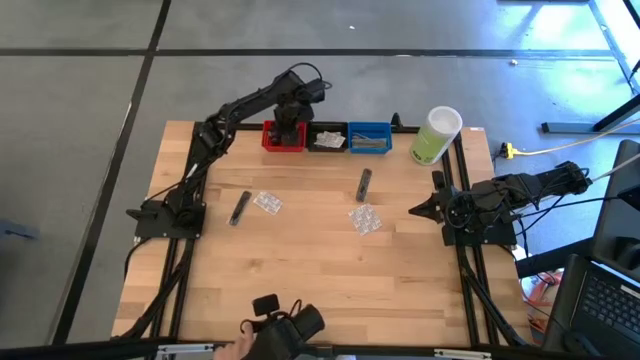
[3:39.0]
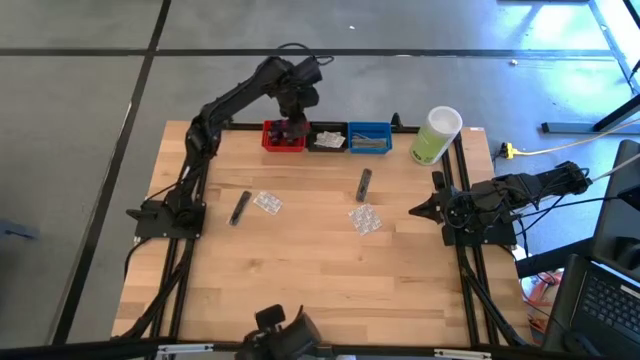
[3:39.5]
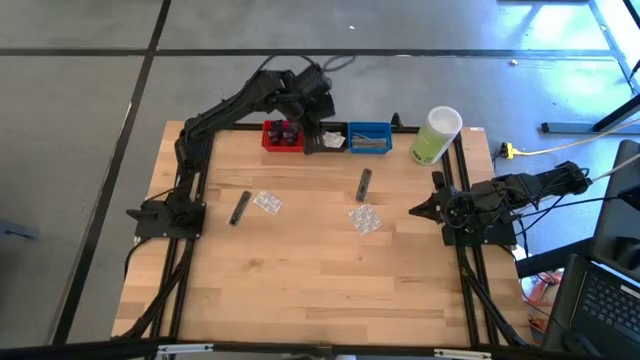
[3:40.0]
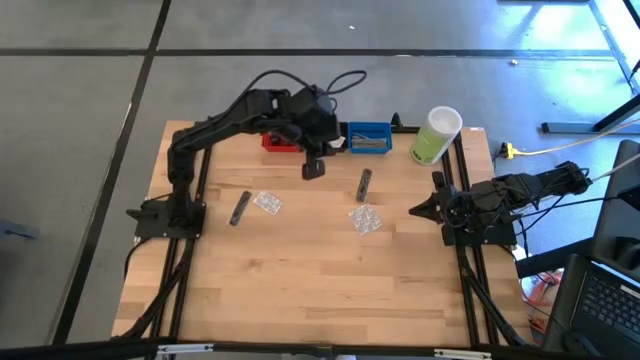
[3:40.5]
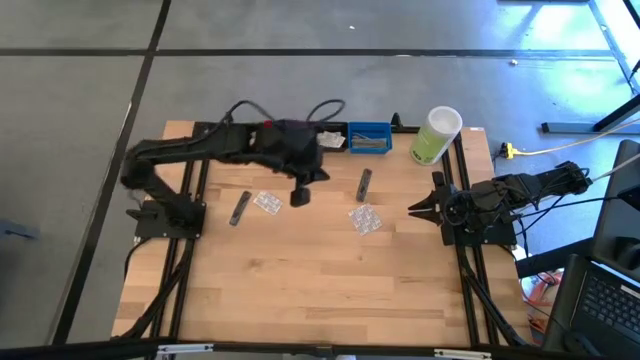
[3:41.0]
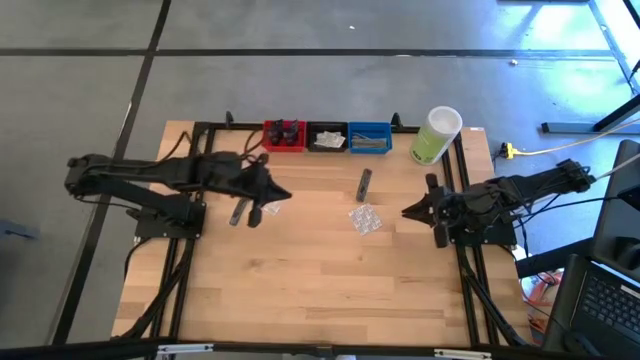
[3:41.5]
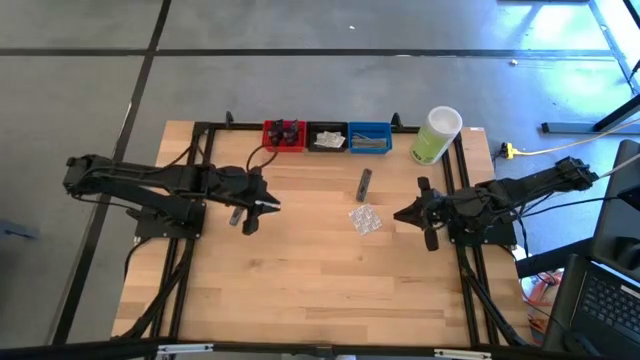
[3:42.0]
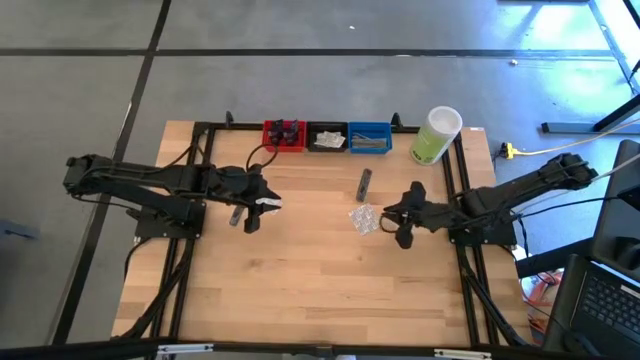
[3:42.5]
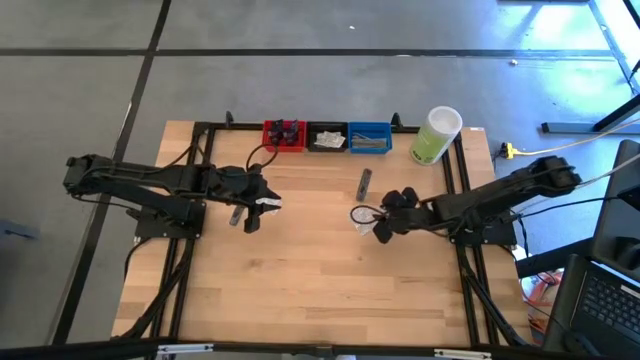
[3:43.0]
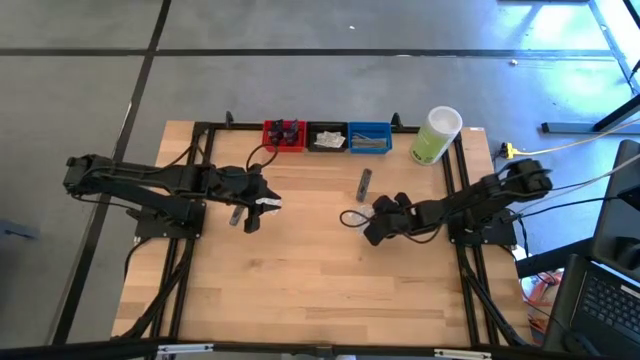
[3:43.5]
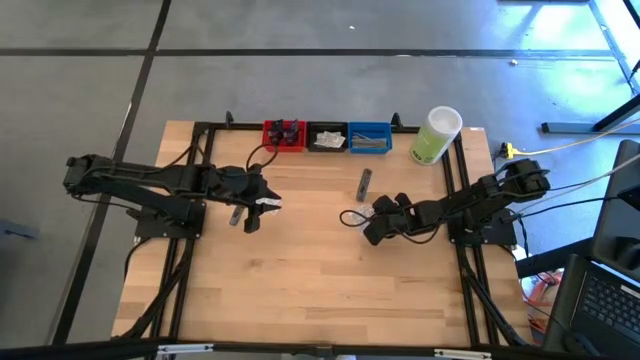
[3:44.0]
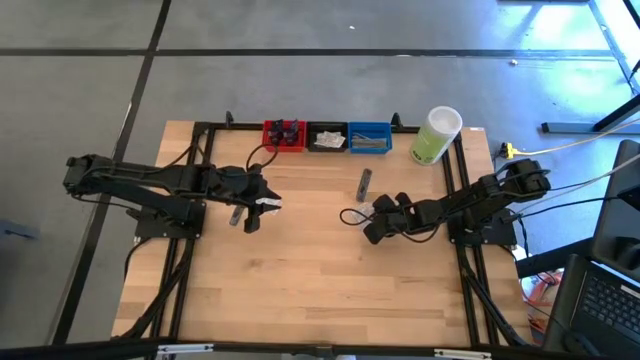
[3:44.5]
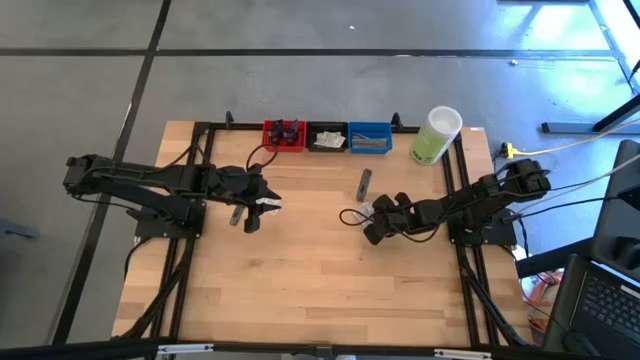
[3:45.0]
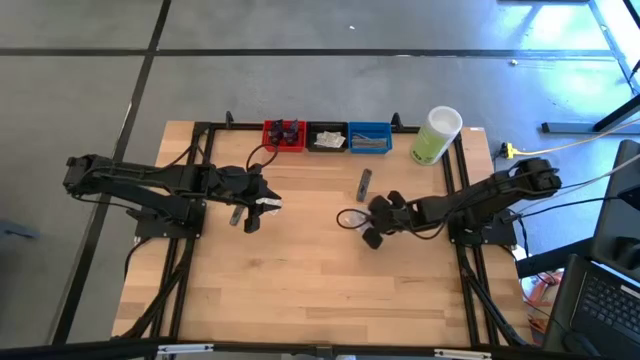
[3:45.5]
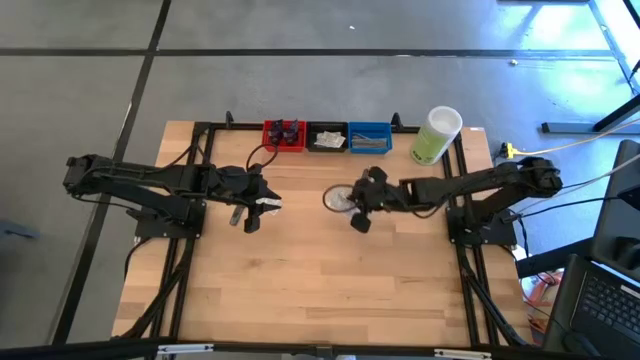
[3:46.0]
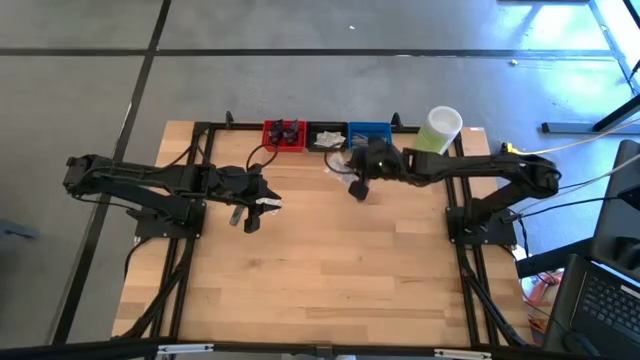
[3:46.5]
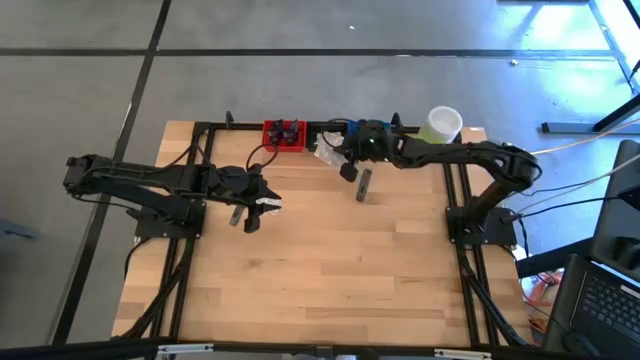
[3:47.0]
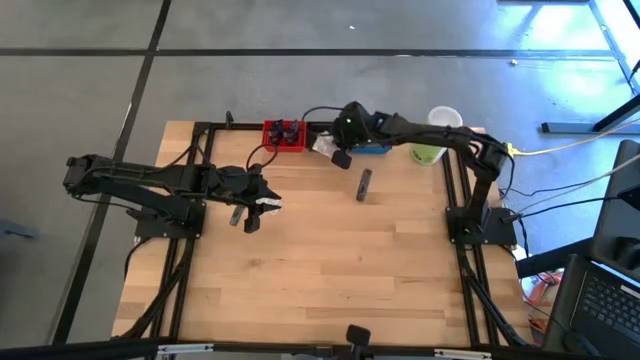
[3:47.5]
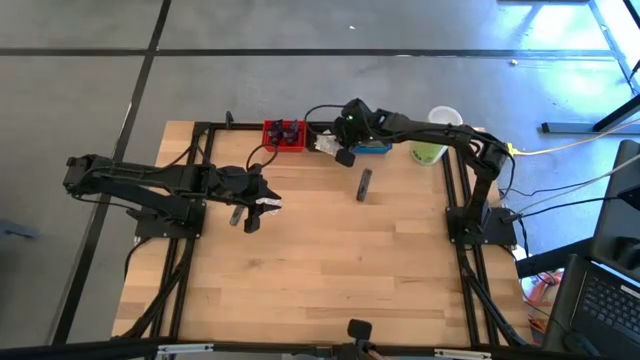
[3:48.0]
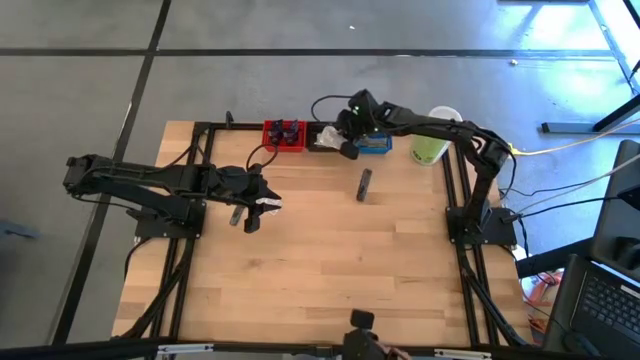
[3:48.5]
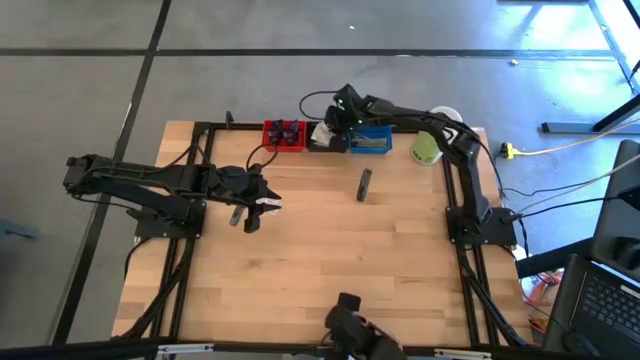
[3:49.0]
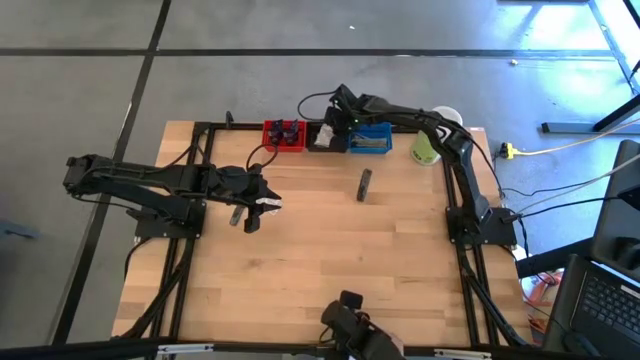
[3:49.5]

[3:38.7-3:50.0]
Task: Pick & Place Travel size toiletries
Put the white bandage pack into the black bin

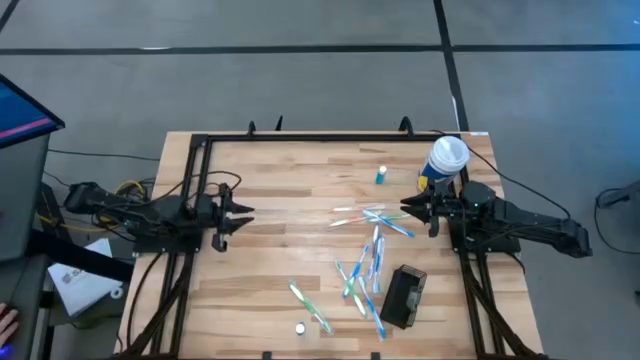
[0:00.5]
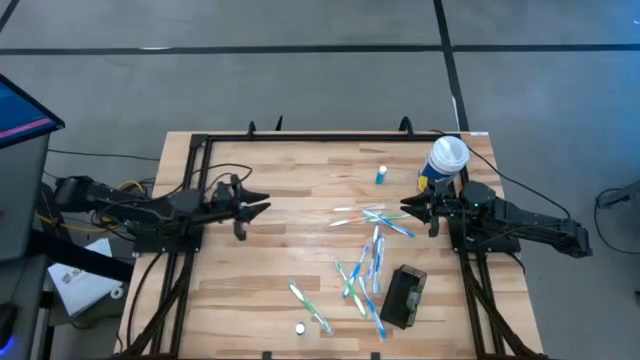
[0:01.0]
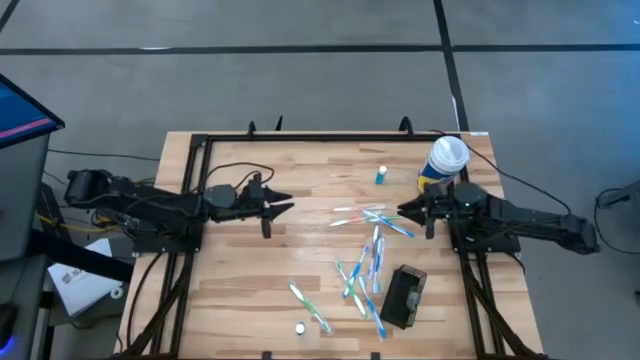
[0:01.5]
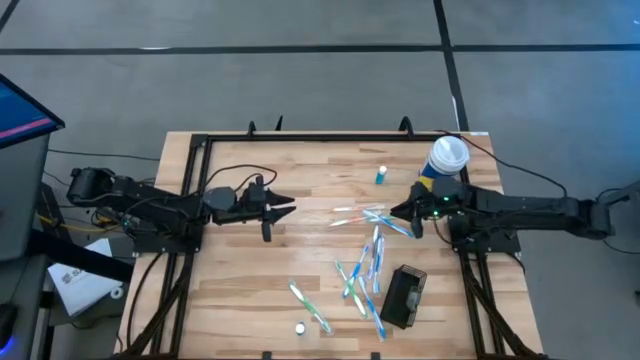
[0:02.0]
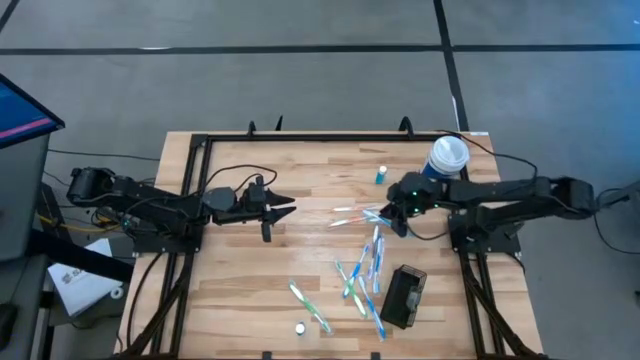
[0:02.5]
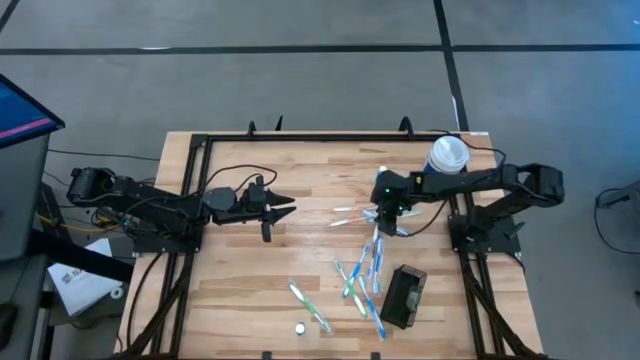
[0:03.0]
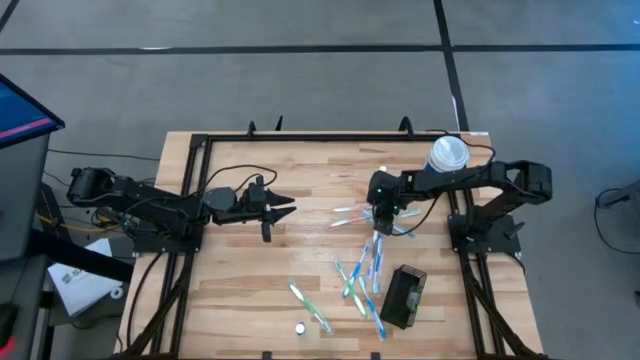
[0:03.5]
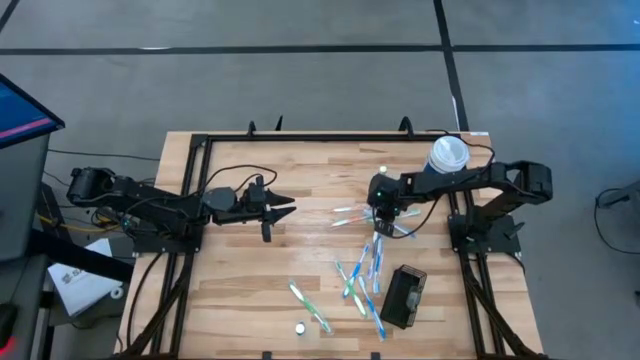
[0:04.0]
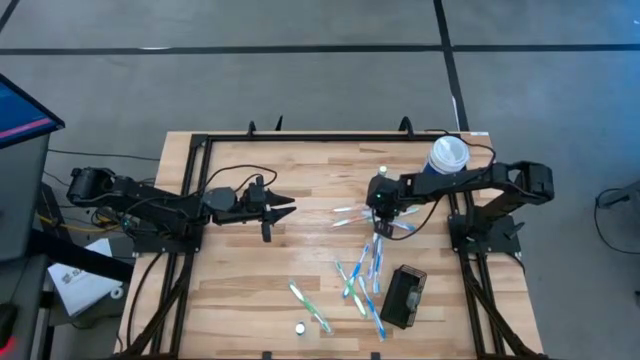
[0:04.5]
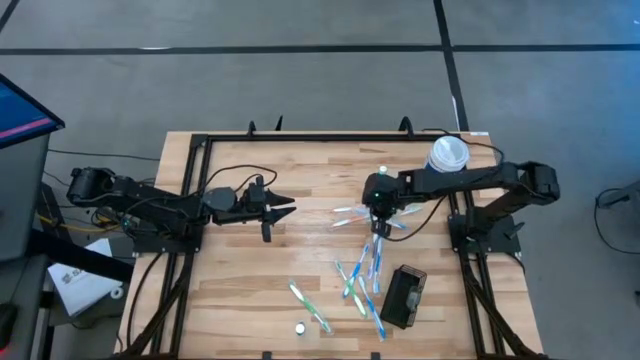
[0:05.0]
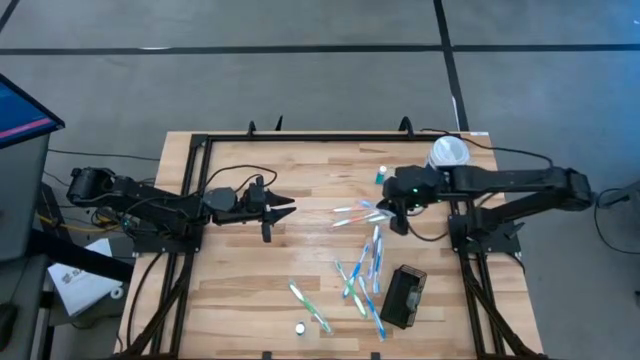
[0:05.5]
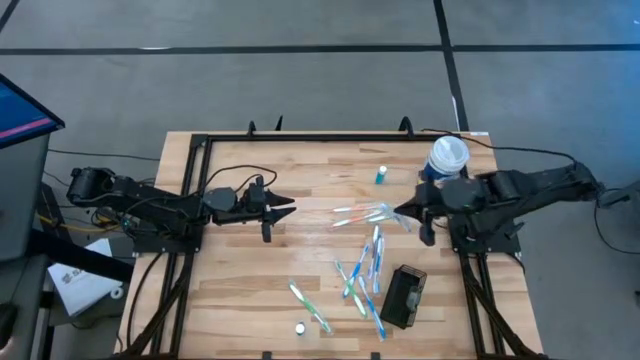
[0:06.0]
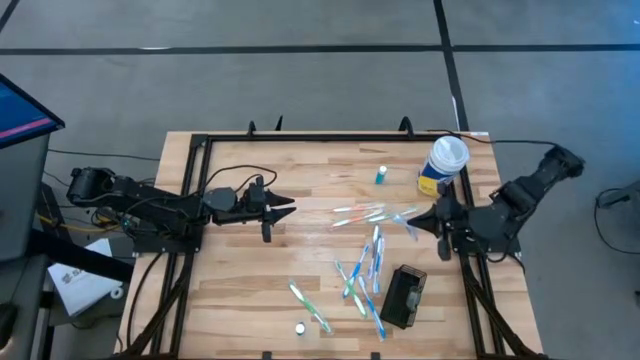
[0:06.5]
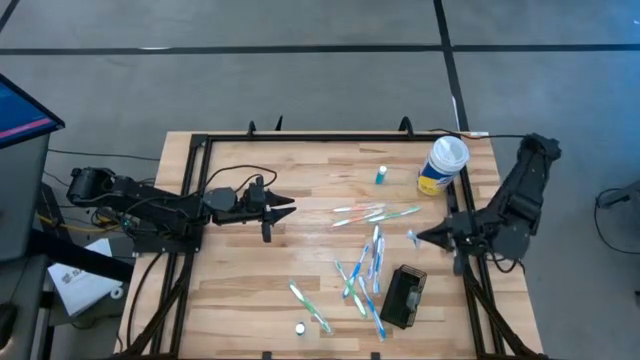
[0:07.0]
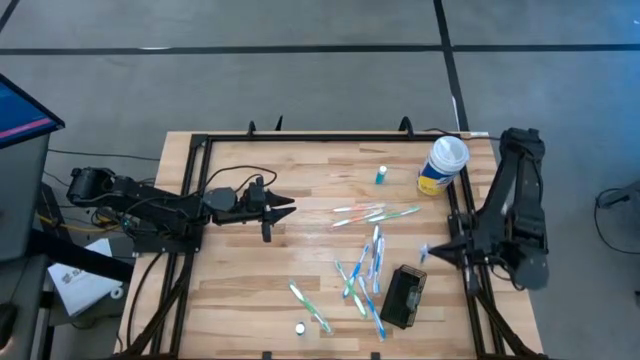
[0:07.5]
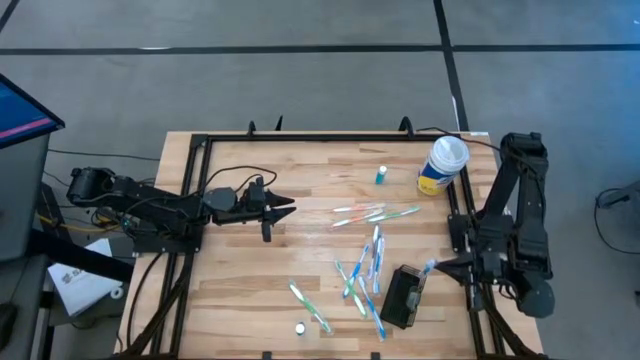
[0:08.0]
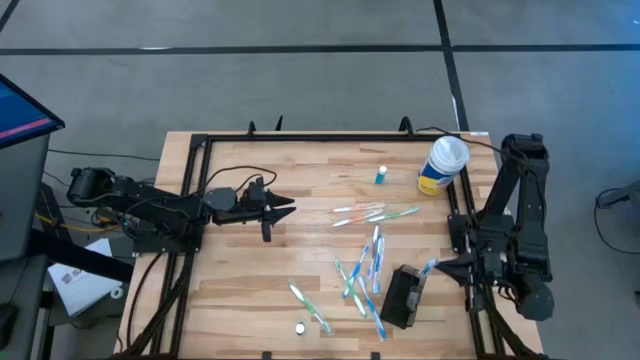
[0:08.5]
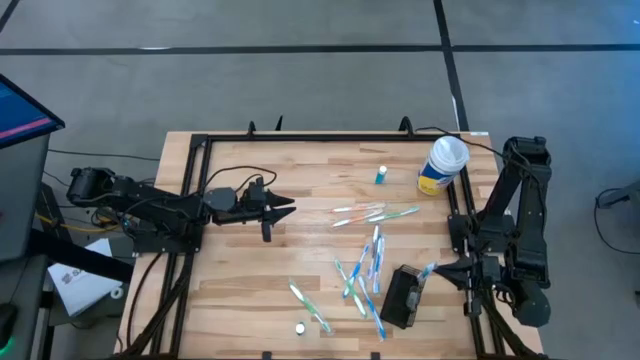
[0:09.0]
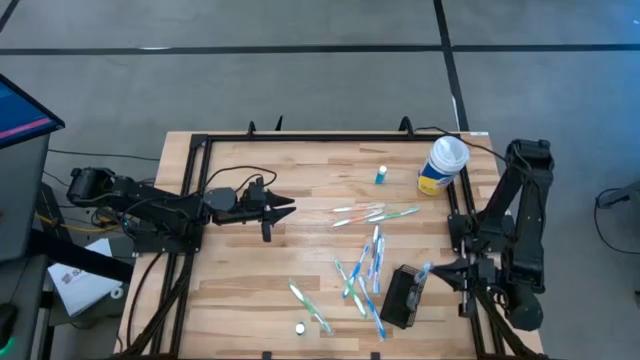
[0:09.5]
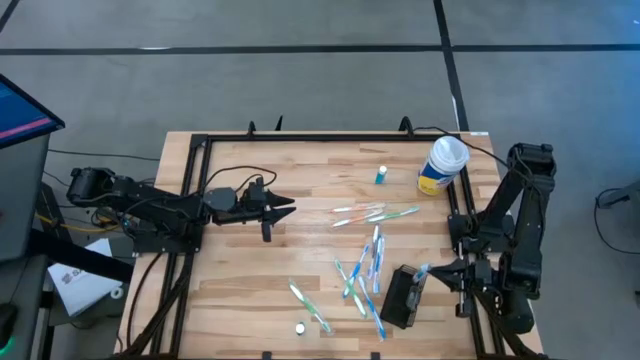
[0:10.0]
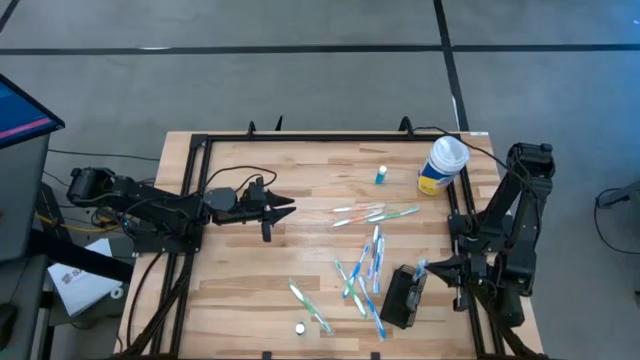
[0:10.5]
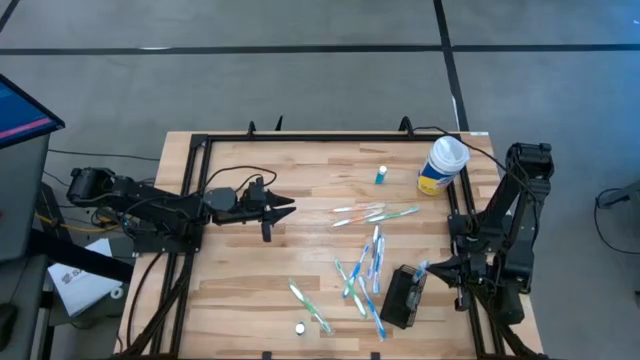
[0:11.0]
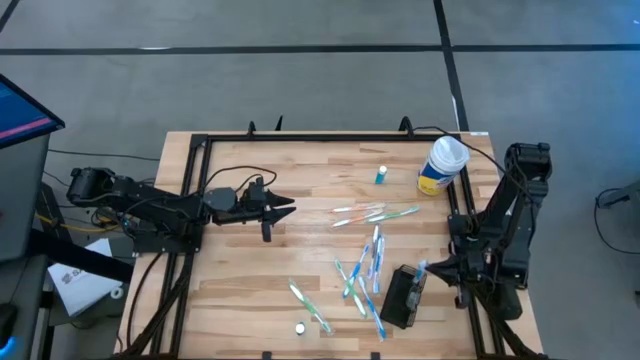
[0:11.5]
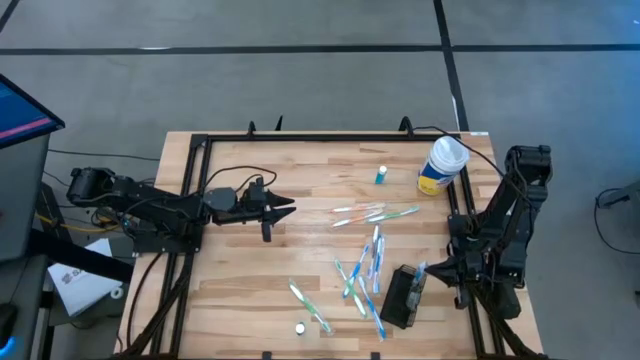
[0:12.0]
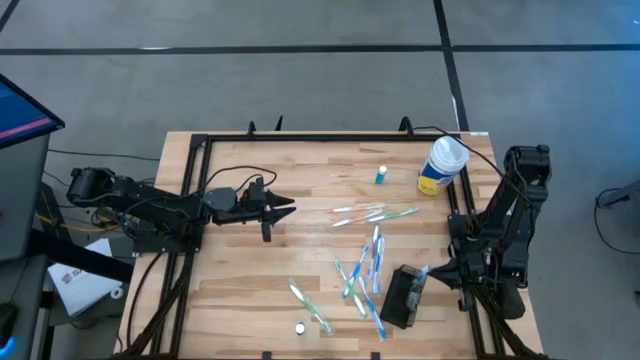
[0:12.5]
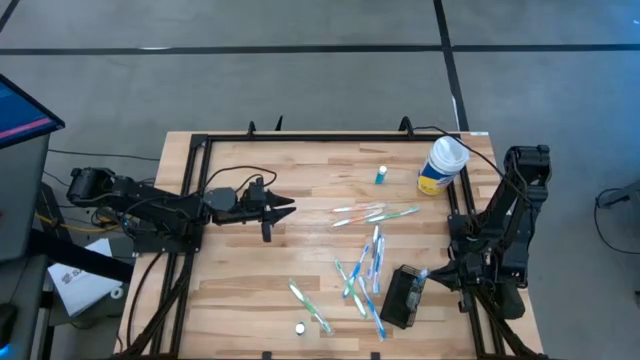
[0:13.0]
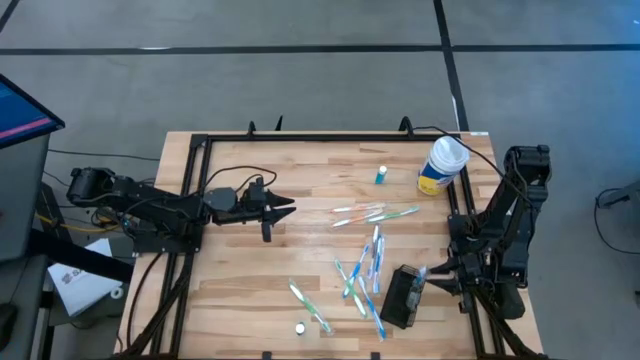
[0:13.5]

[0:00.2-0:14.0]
Task: Pick & Place toothbrushing station
Put the blue toothbrush into the black wire organizer
